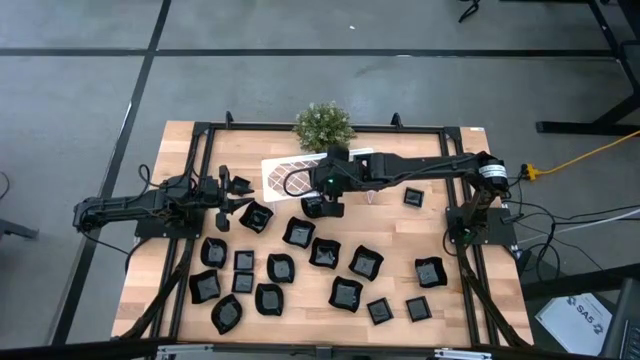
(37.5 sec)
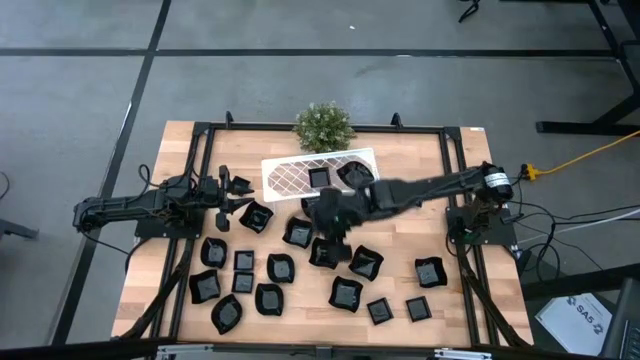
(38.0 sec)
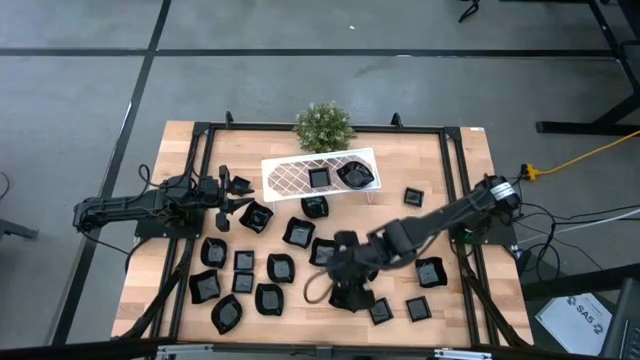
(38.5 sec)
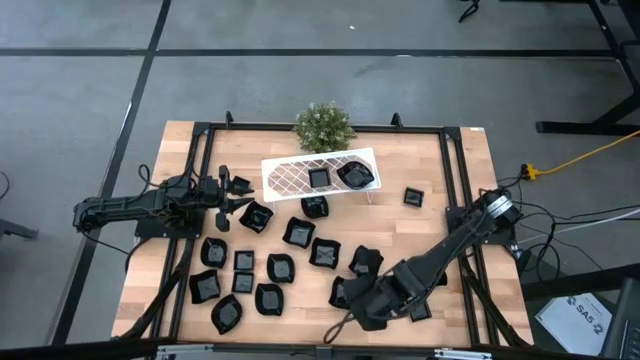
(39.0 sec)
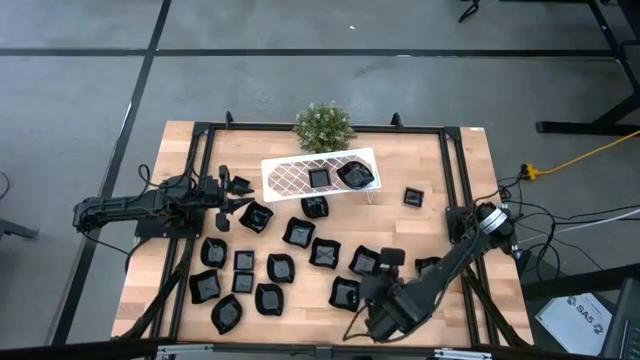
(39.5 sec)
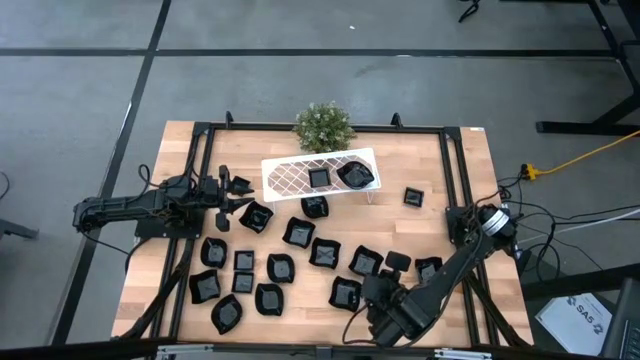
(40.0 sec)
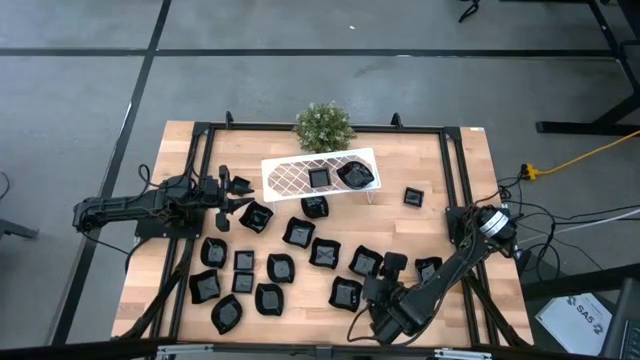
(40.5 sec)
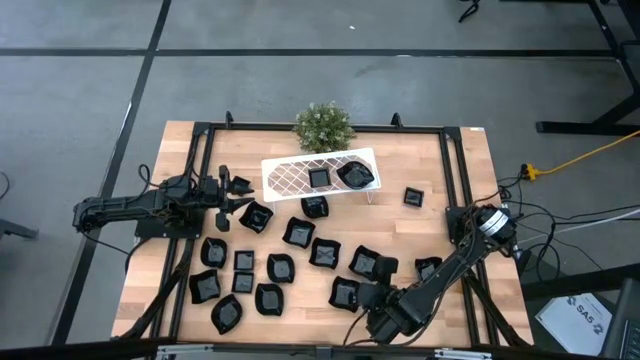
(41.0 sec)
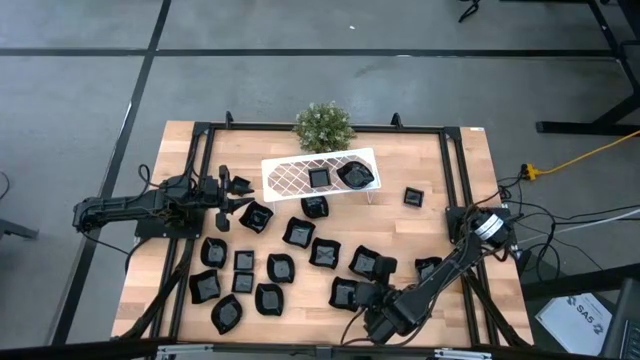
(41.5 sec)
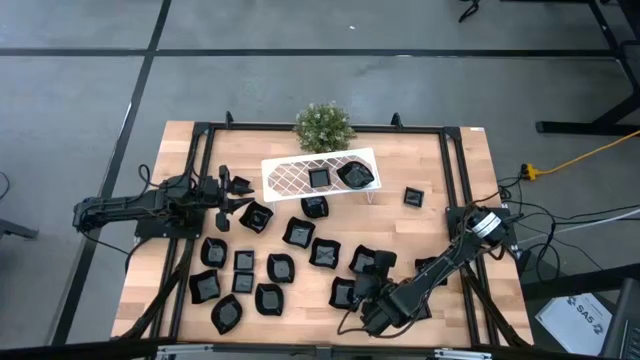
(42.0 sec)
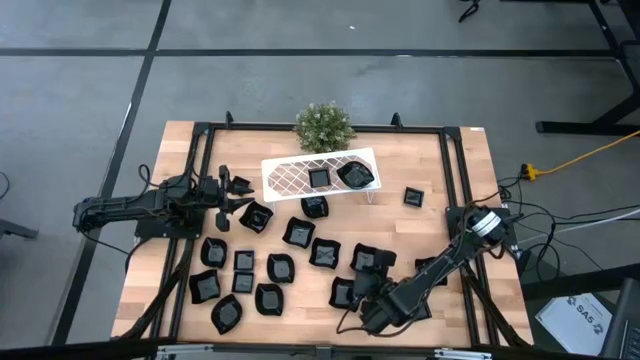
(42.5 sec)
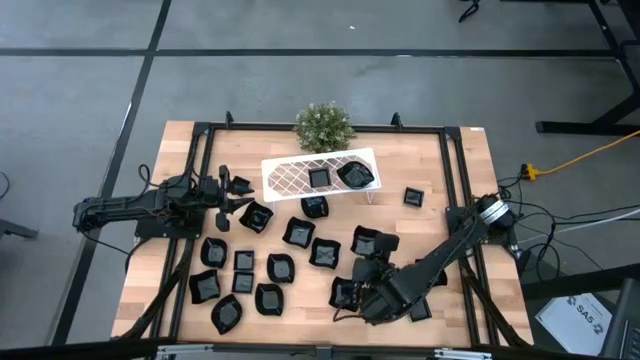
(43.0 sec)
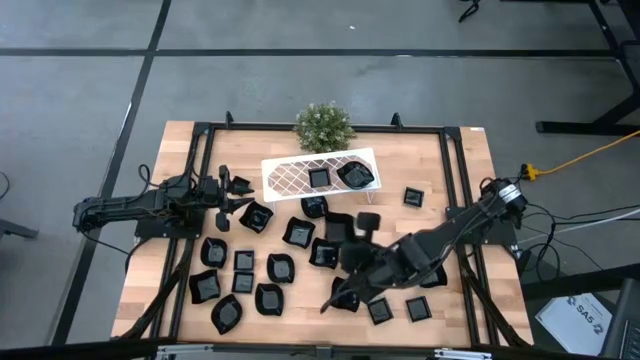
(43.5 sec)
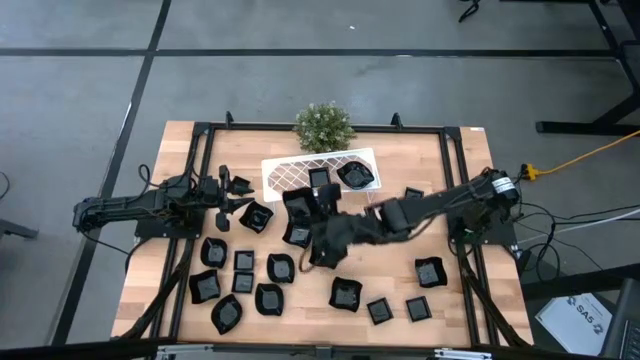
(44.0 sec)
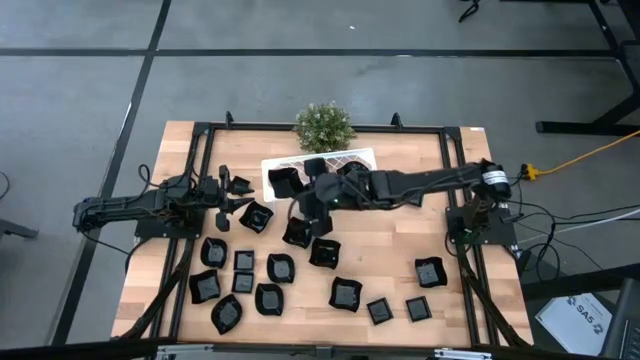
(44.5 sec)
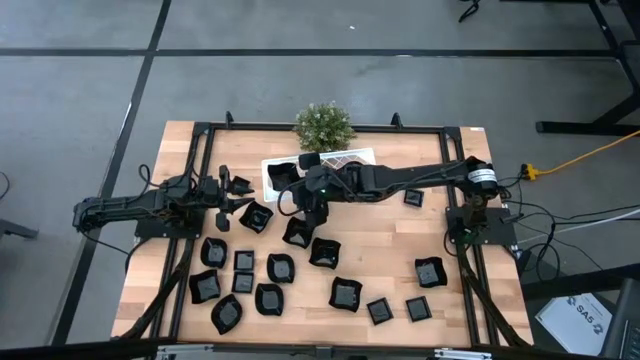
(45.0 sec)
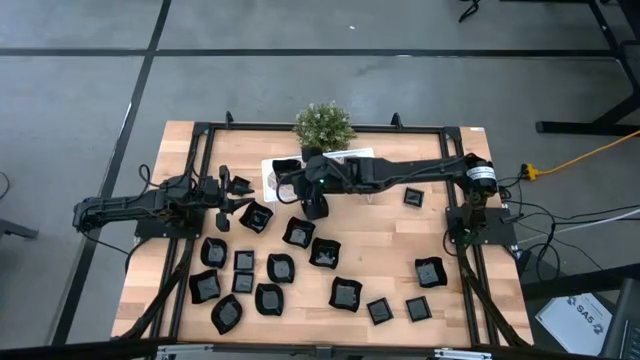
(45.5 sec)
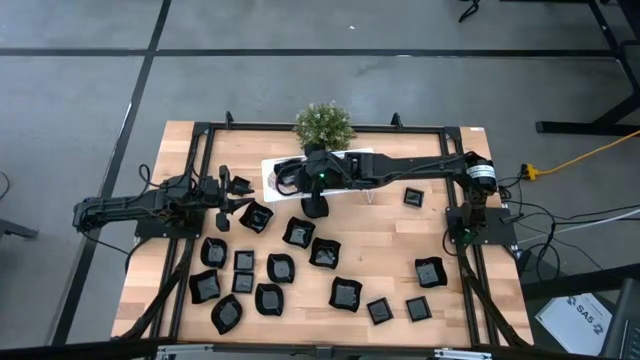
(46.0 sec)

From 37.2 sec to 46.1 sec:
Task: Pick & Place Mini shaped plates
Put the distorted square plate on the shelf

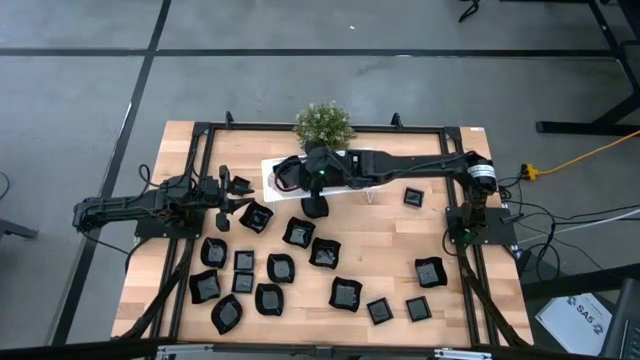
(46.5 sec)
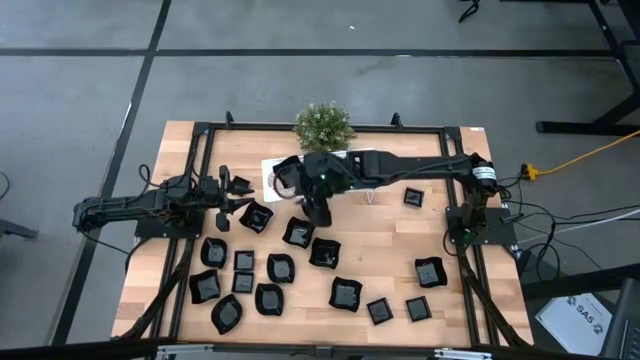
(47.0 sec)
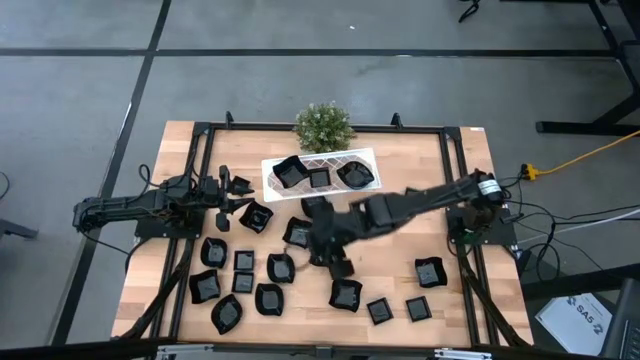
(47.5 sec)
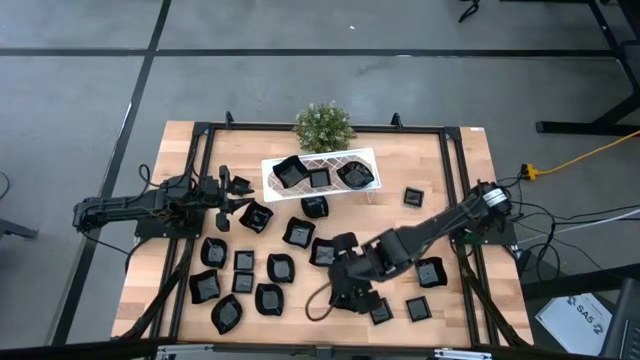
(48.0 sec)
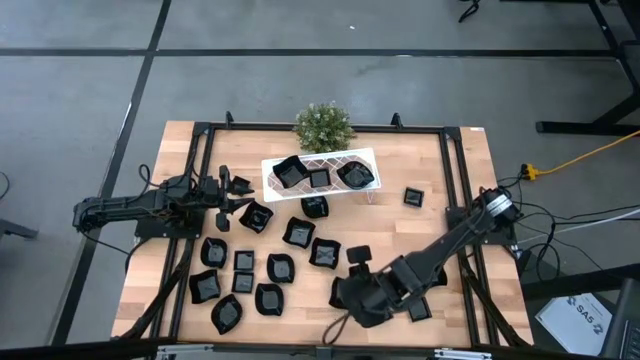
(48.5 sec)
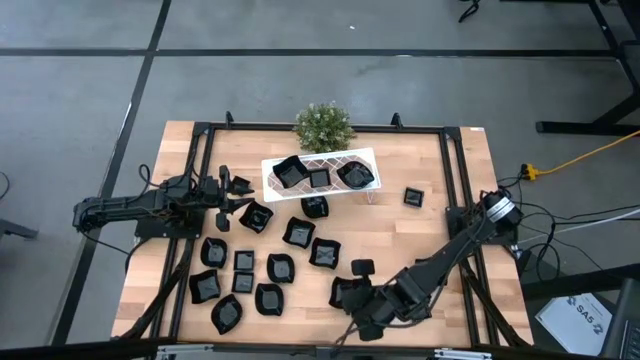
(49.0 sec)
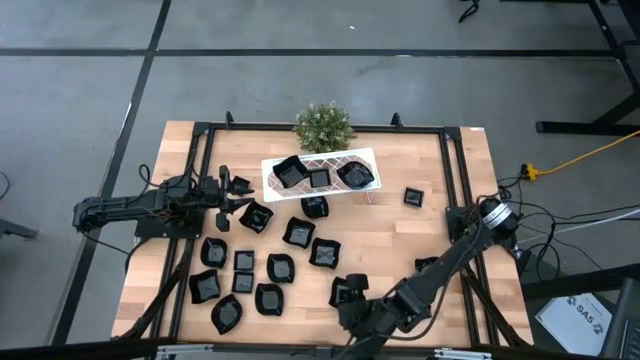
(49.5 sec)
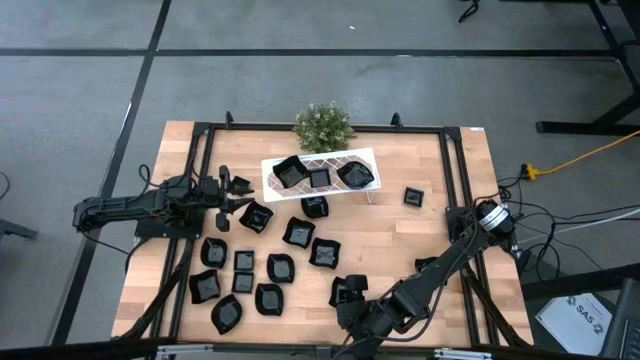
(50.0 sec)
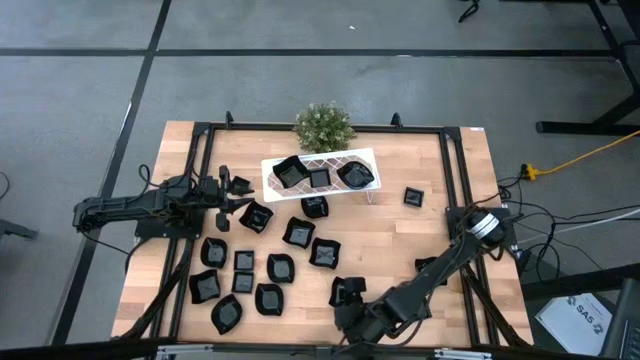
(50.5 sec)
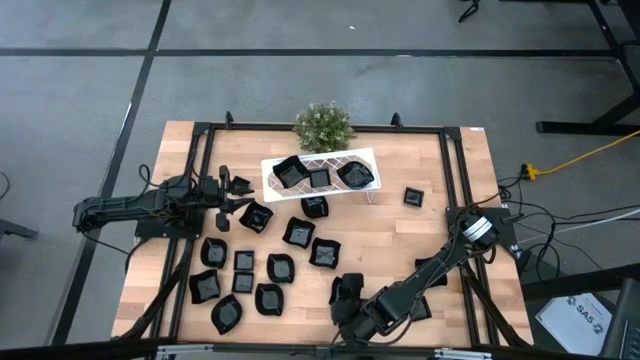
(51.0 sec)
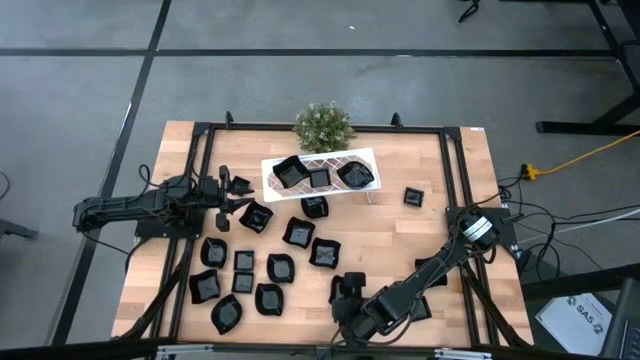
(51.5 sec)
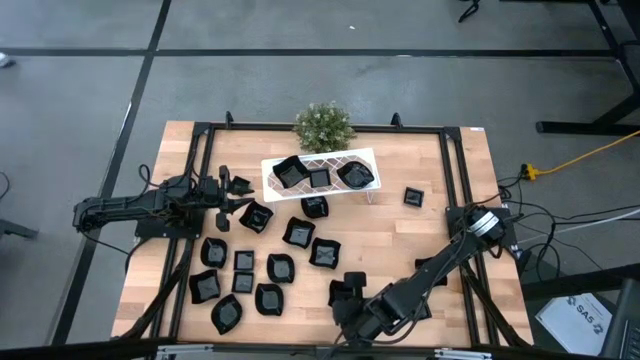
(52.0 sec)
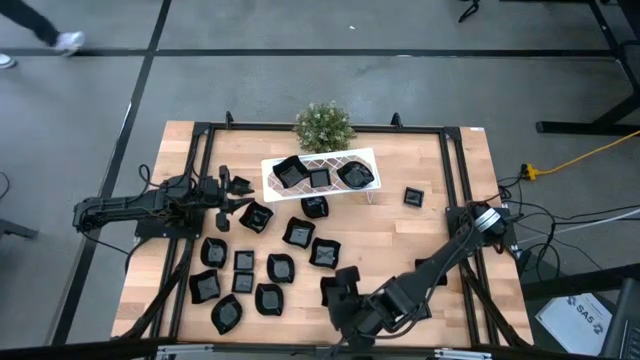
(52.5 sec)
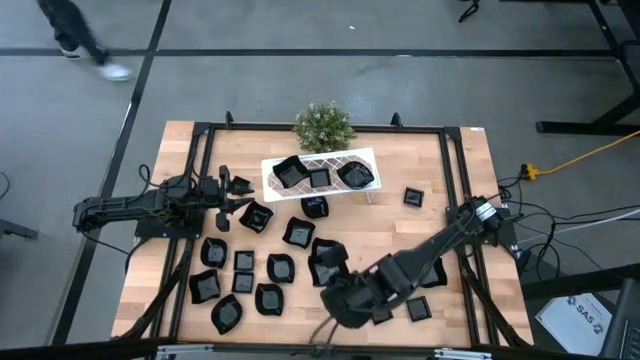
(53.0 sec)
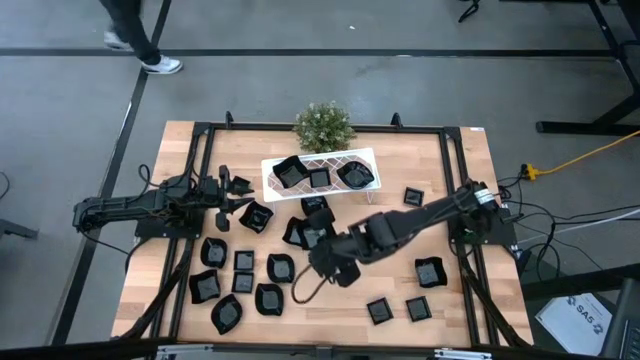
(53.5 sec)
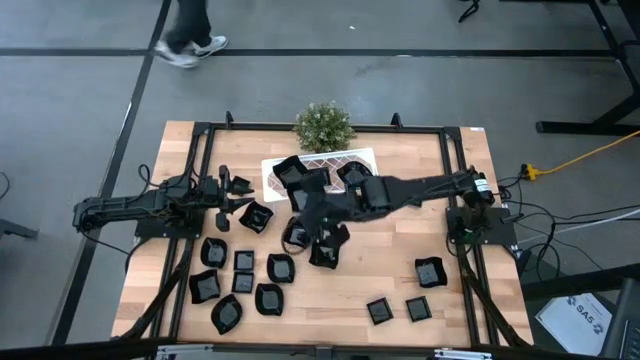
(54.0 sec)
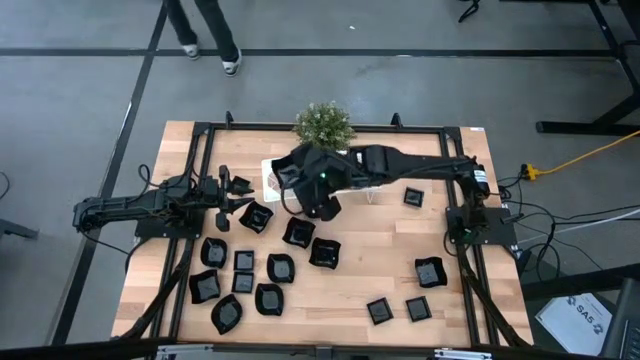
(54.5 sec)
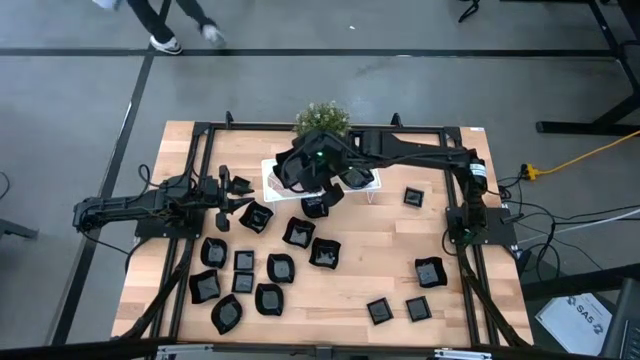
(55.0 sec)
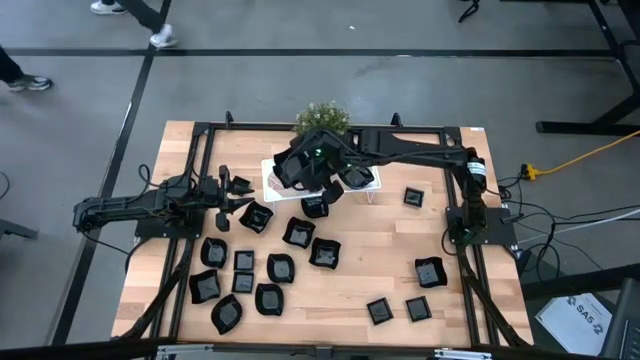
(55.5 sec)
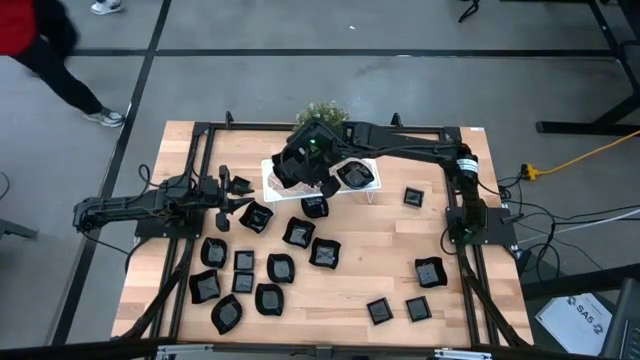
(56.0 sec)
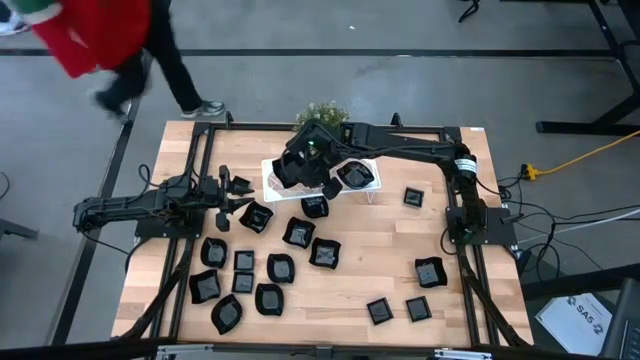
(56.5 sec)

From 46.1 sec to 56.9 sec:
Stack the distorted square plate on top of the distorted square plate on the shelf

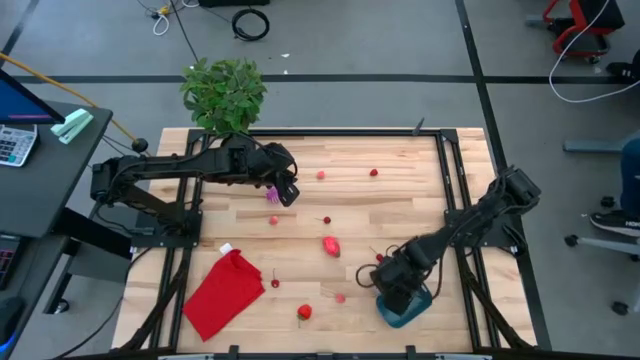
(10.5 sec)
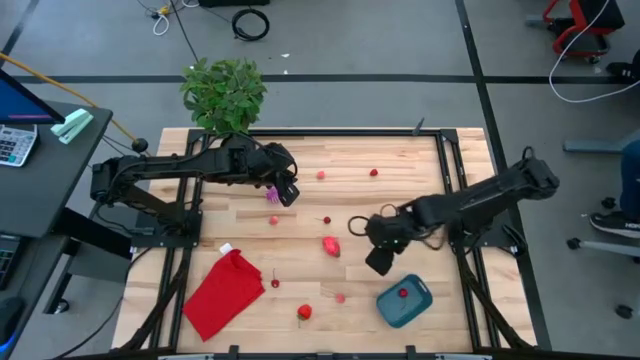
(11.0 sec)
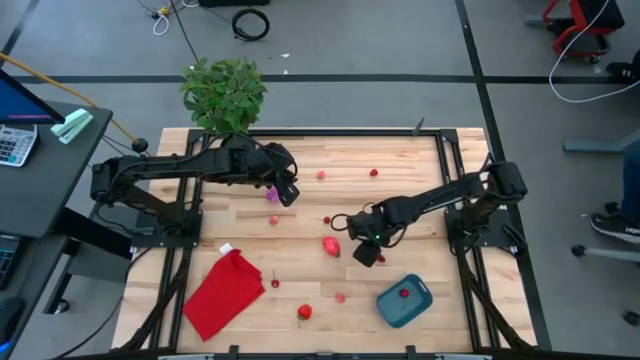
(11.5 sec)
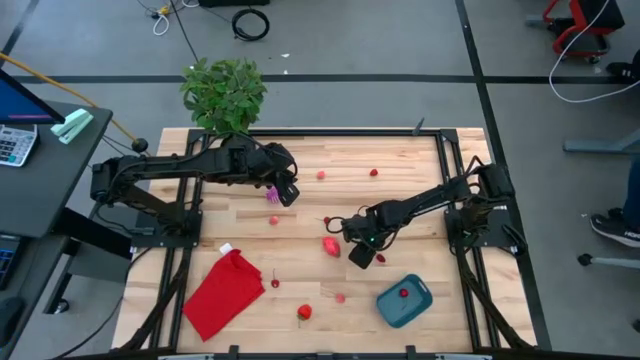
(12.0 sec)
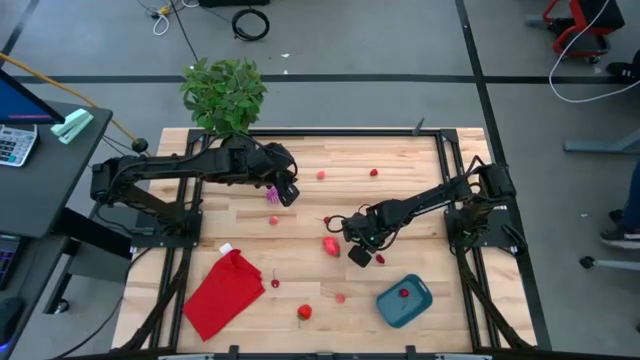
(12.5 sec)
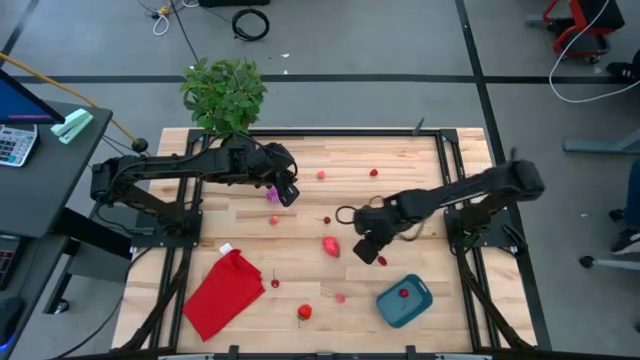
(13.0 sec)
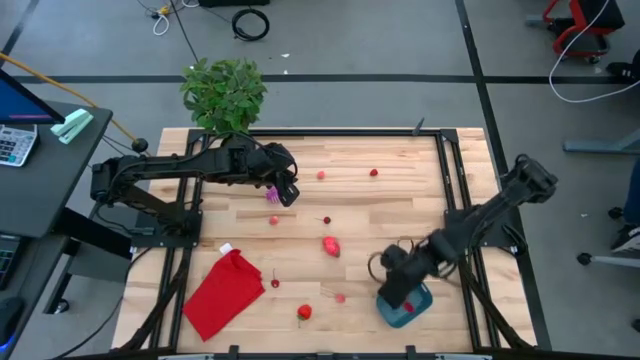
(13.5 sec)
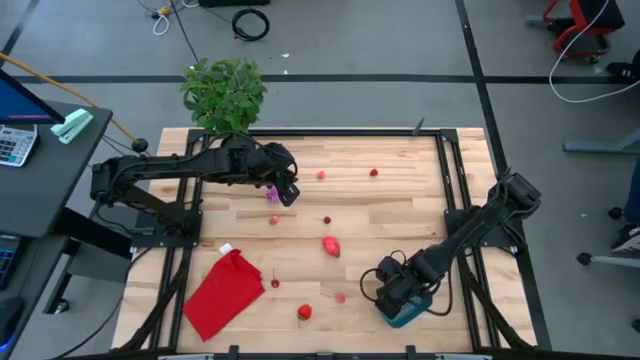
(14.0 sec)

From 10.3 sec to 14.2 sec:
Task: Pick and placing Produce into tupperware
Put the right cherry into the bin
